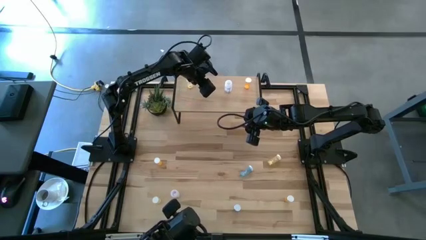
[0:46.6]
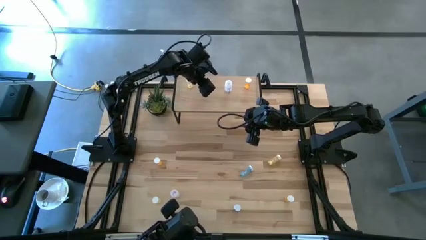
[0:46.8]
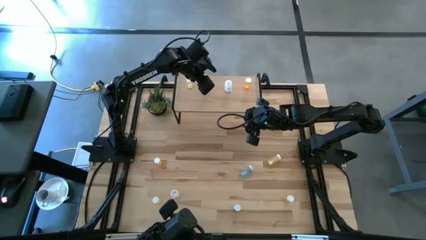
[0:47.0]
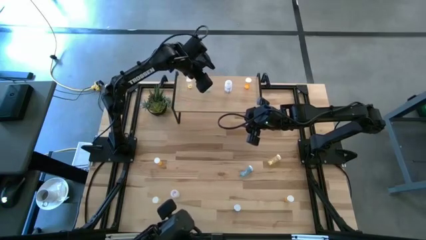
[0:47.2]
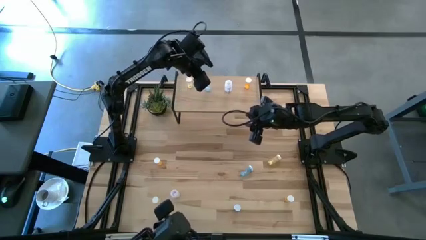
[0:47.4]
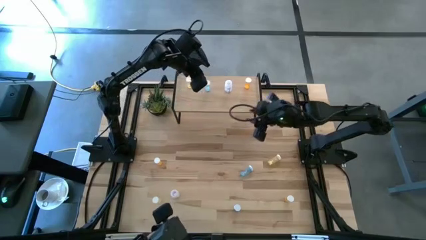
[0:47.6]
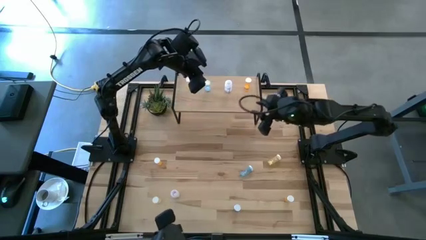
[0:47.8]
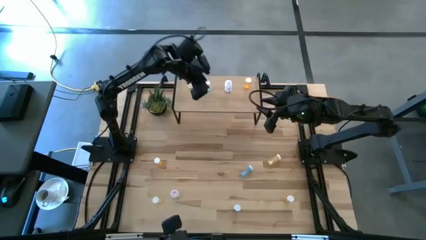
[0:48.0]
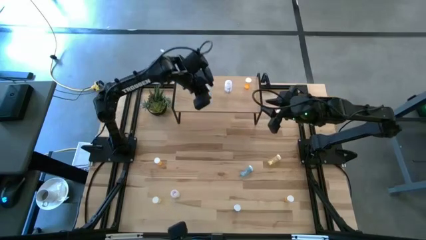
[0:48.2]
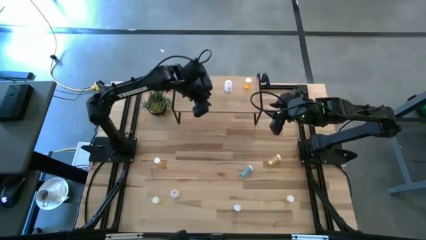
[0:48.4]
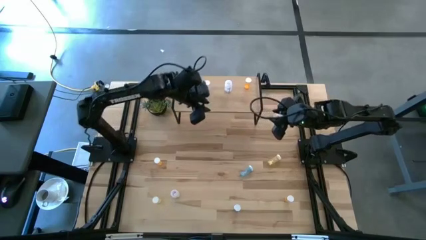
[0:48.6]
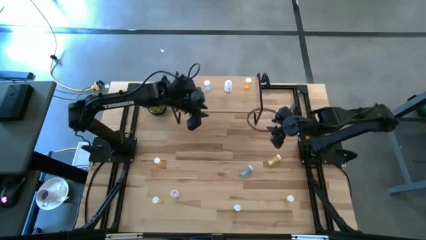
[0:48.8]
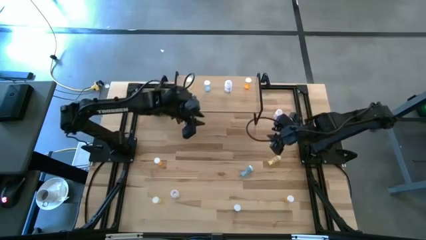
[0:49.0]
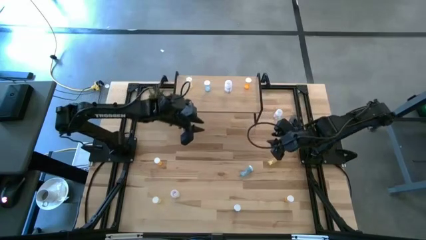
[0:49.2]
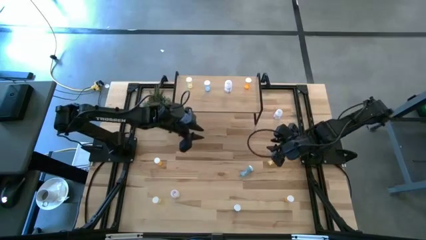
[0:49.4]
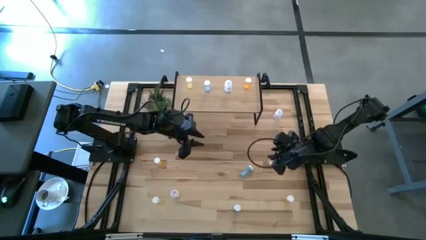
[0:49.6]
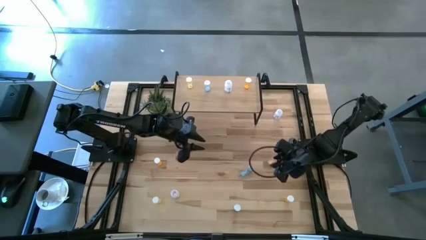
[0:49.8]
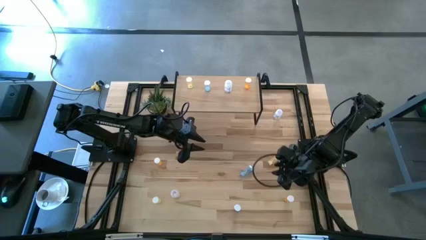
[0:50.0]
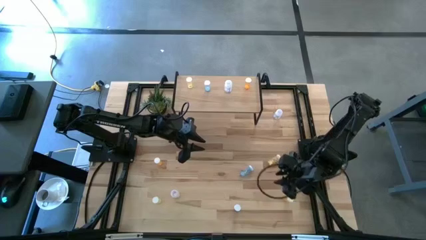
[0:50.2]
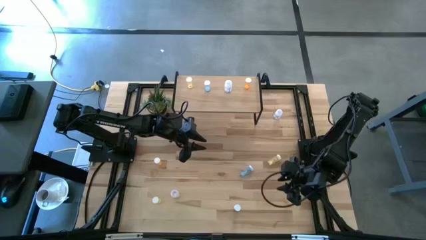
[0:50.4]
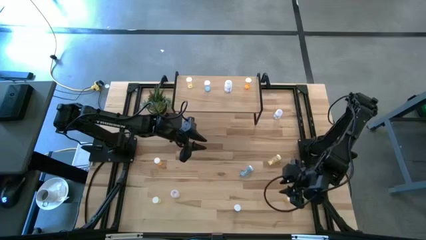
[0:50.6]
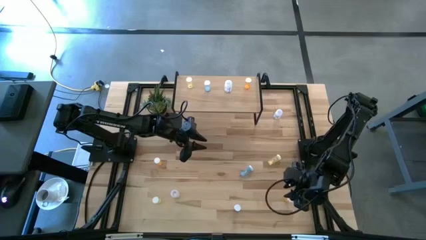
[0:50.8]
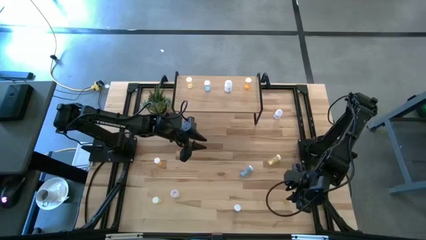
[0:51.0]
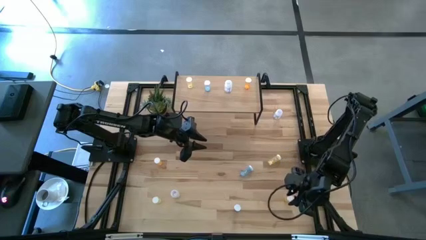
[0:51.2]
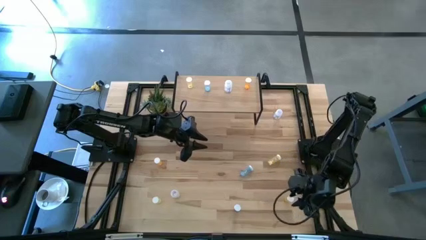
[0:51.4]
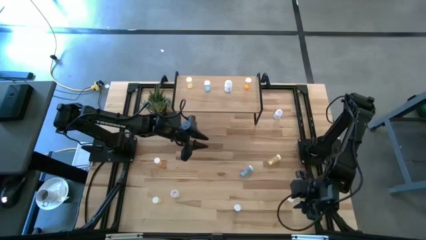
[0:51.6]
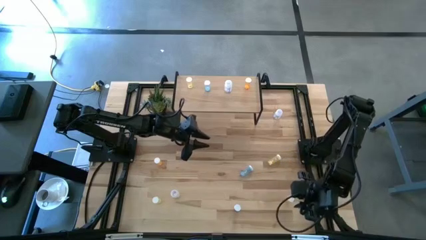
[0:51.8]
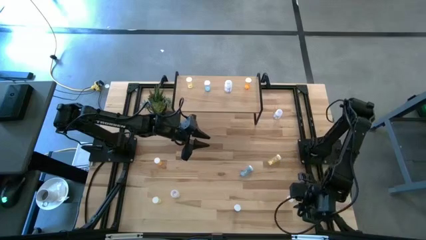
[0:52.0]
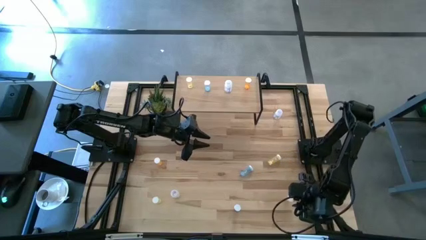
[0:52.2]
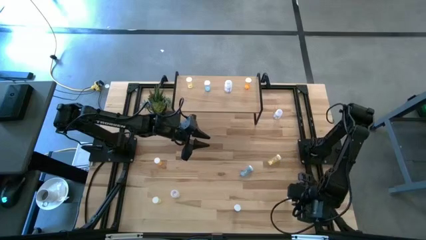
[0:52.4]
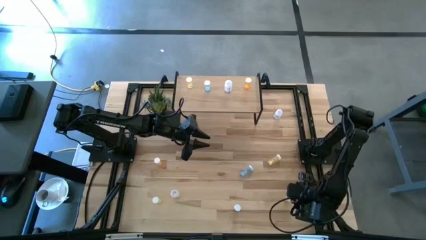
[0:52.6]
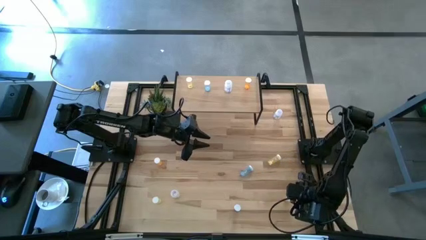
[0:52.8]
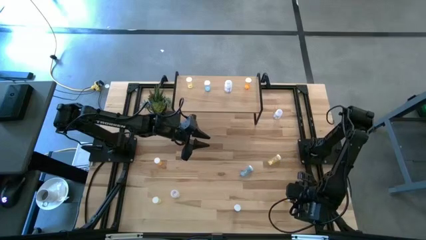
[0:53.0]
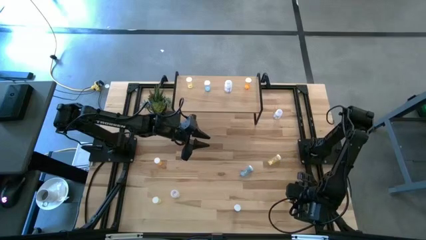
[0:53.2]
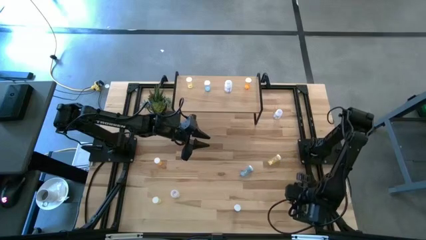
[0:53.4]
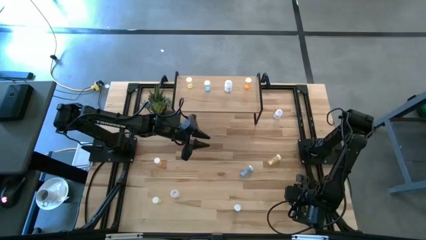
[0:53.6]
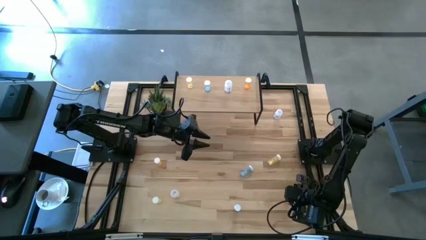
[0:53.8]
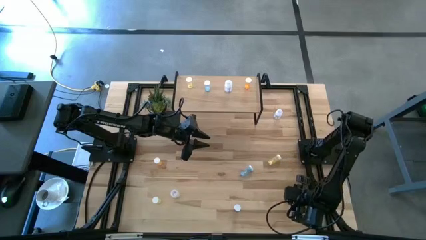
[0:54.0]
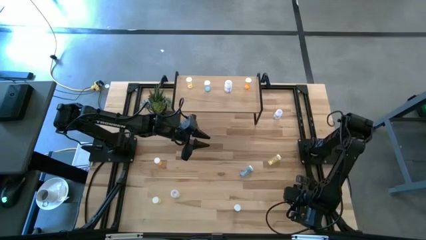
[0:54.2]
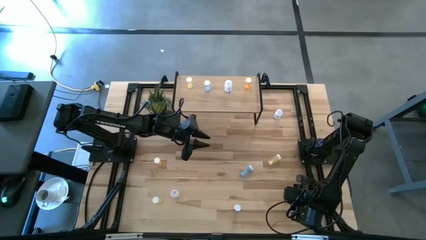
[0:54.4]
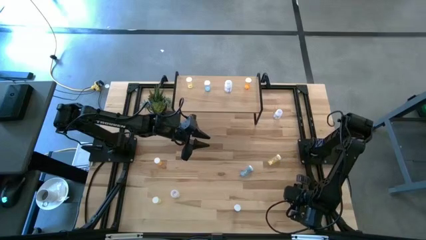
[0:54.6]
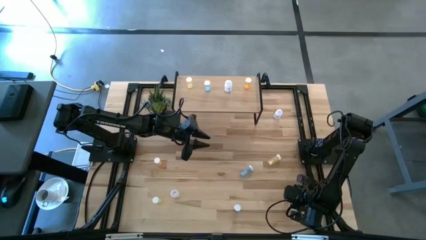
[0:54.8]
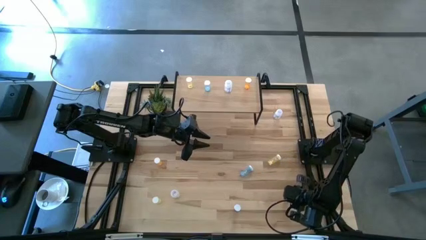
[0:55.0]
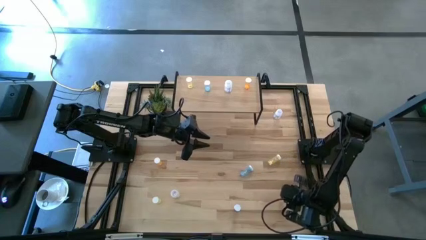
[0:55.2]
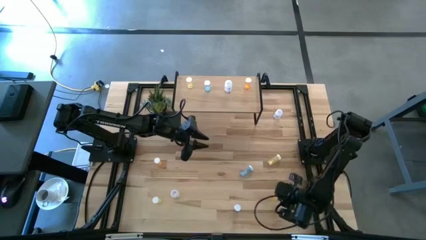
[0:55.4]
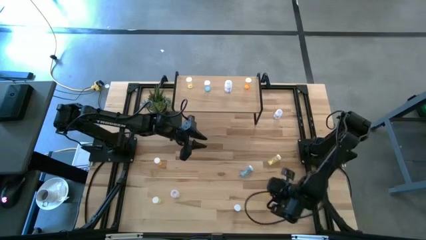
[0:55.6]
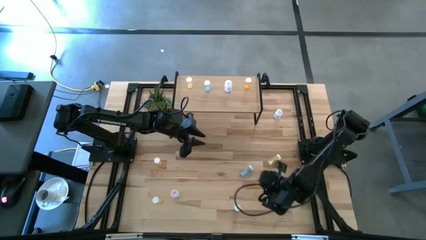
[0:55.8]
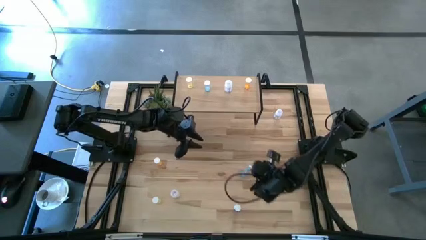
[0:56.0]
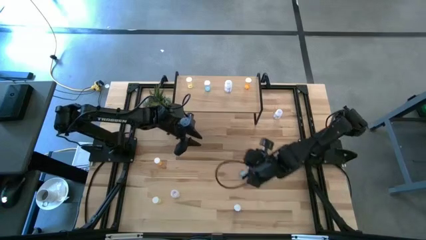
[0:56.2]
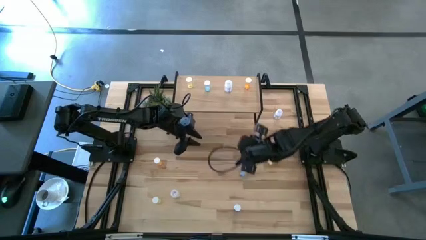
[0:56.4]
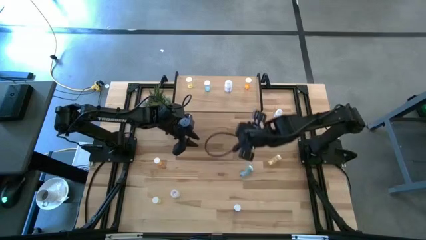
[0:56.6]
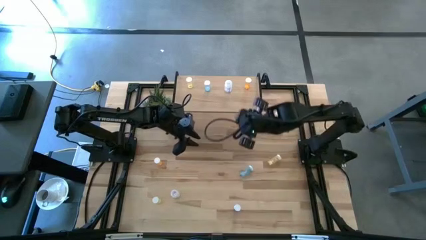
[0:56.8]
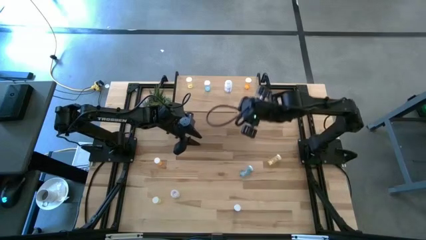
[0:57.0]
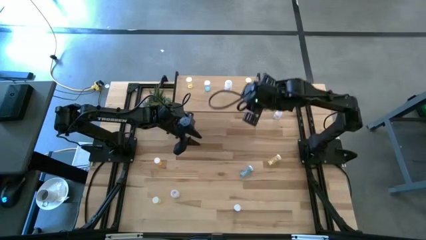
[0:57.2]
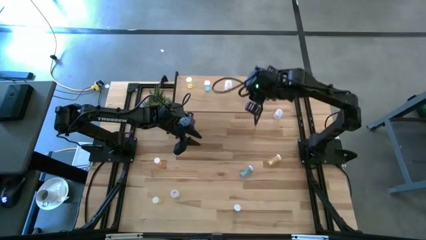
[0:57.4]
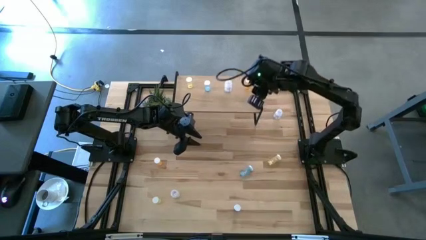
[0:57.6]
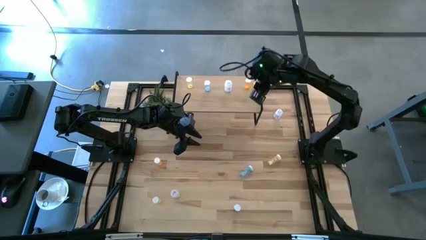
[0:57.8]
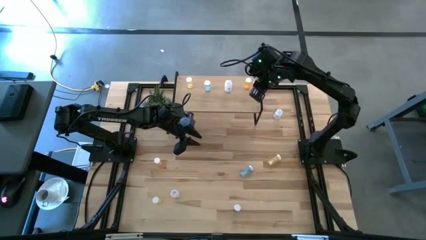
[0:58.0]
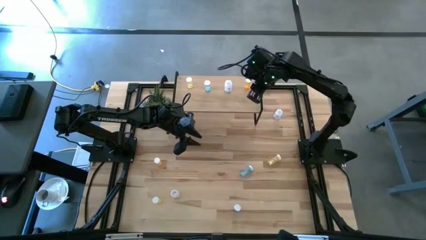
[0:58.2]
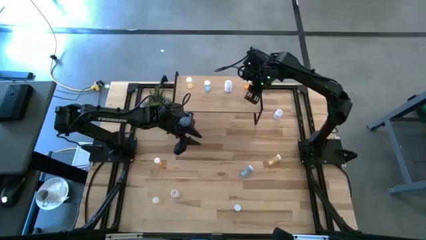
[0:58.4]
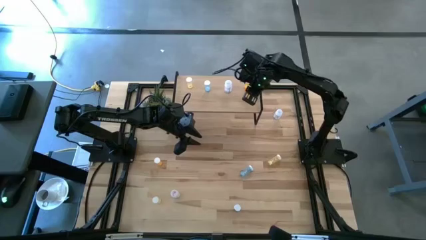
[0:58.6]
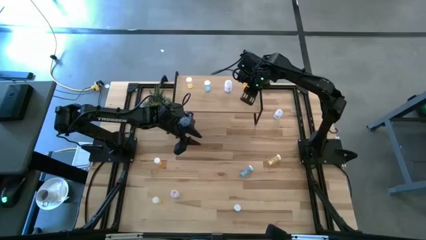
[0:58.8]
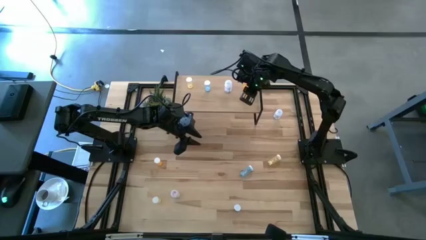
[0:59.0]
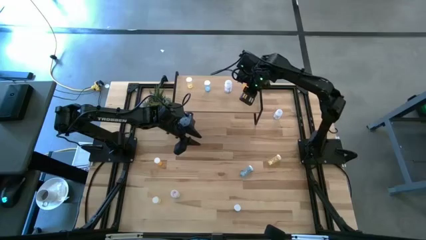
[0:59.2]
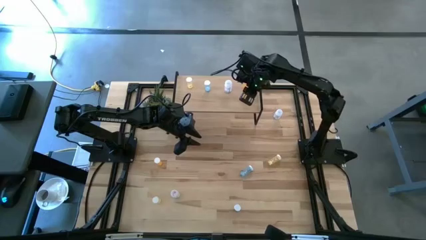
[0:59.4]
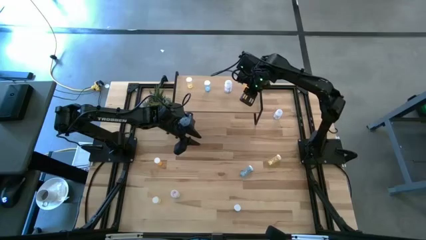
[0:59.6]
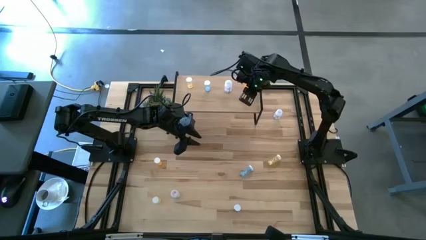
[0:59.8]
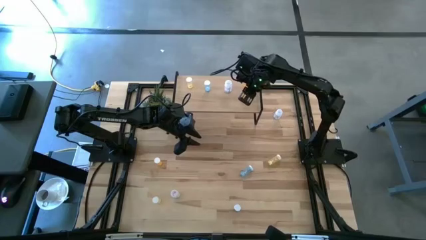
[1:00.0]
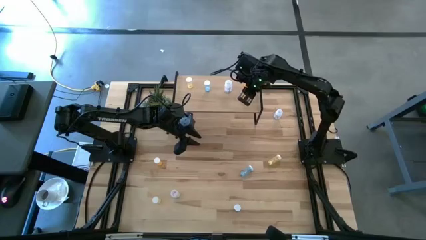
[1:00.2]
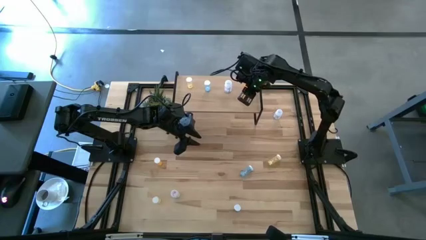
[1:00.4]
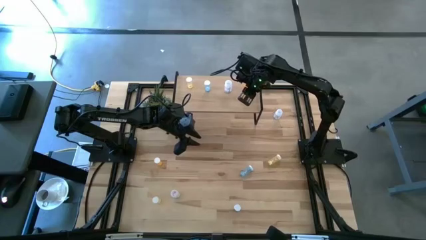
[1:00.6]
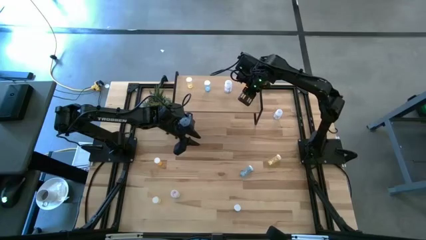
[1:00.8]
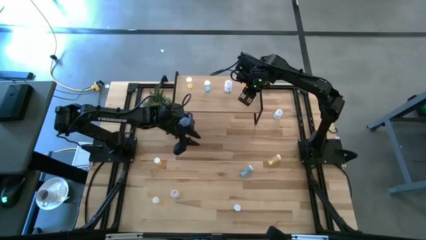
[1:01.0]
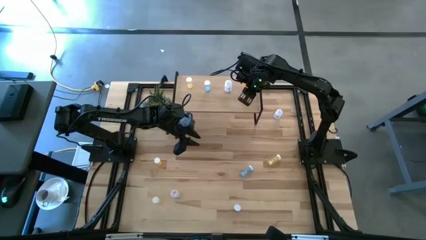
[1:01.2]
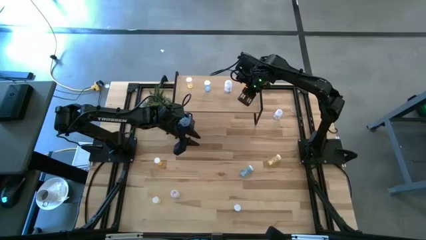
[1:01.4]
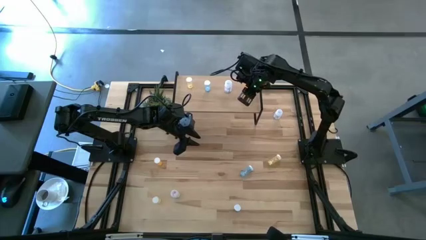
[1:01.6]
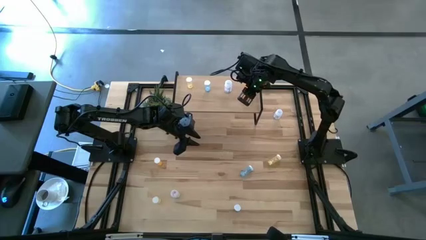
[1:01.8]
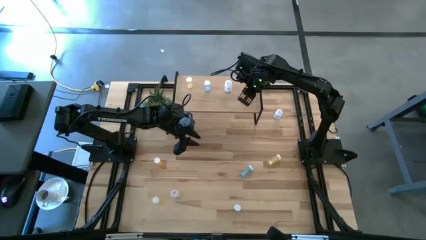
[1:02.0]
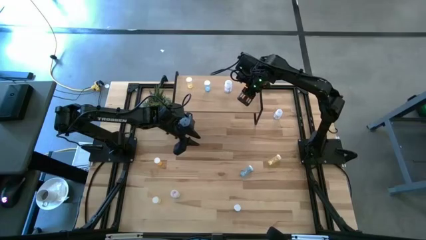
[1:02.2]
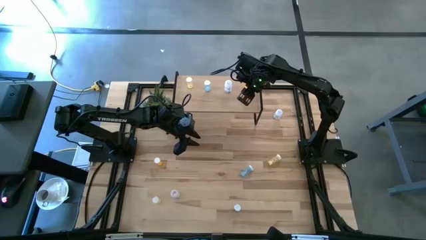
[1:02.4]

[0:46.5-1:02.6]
Task: Pick and place medicine bottles onto shelf by color
Put the right orange pill bottle on the shelf
